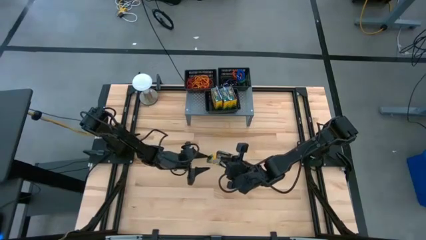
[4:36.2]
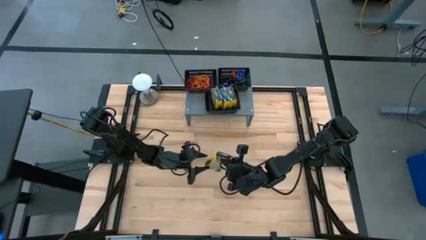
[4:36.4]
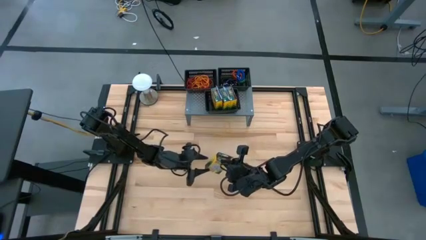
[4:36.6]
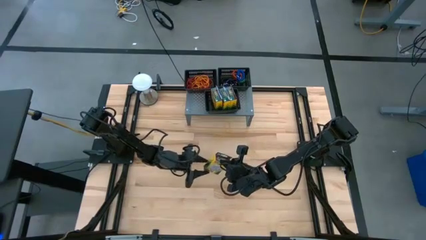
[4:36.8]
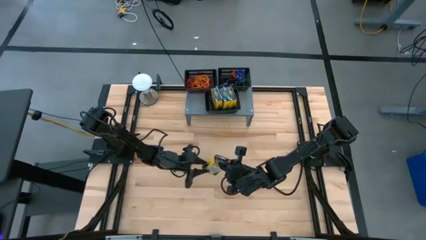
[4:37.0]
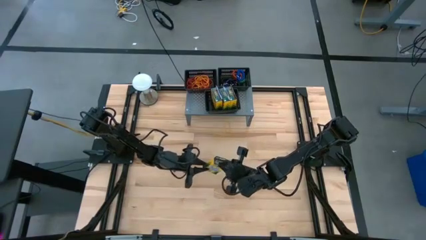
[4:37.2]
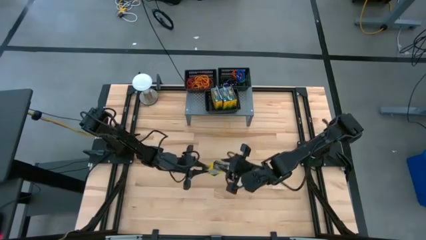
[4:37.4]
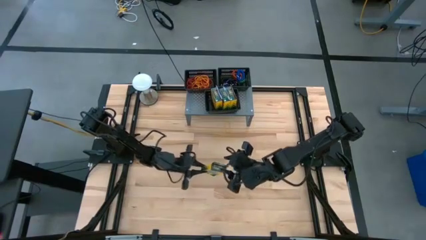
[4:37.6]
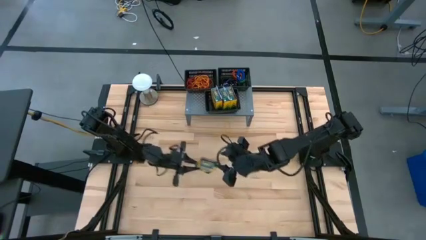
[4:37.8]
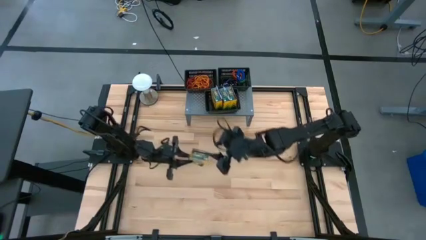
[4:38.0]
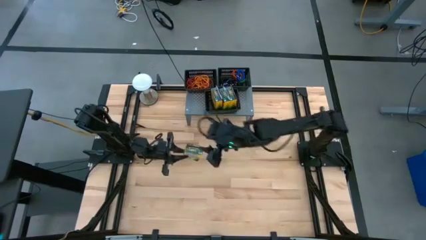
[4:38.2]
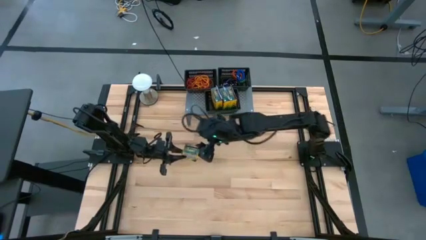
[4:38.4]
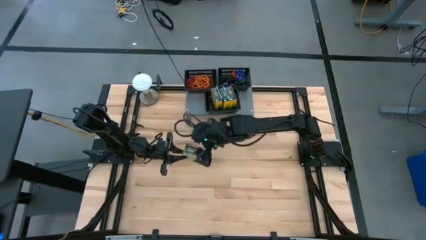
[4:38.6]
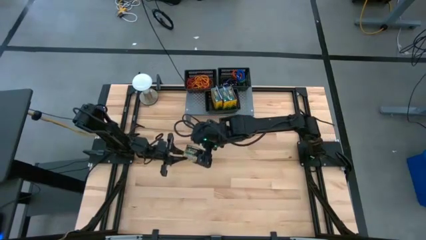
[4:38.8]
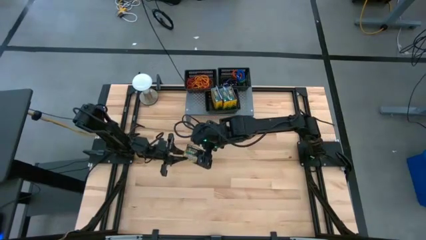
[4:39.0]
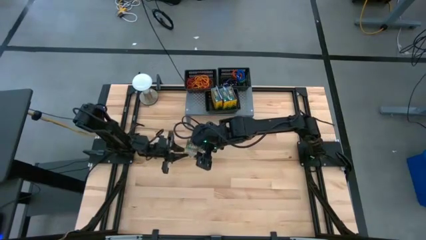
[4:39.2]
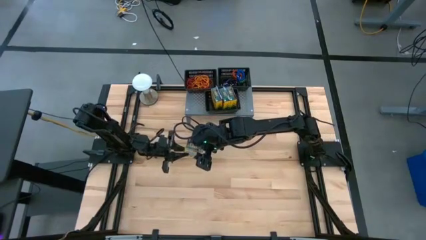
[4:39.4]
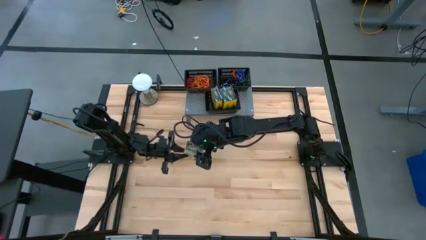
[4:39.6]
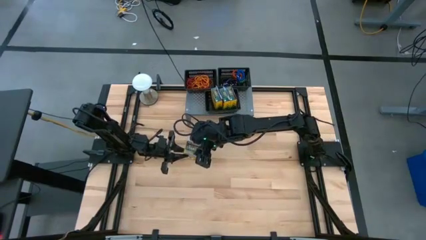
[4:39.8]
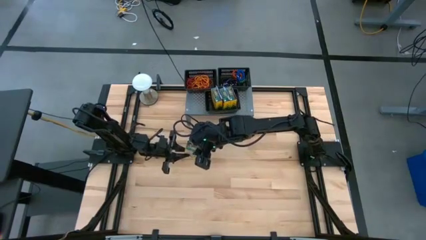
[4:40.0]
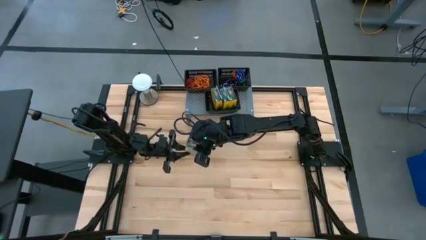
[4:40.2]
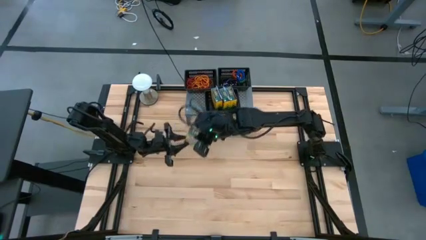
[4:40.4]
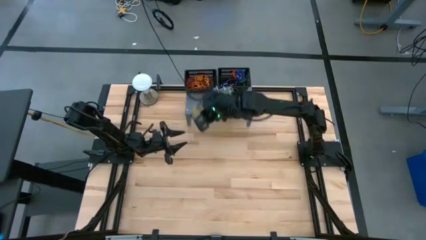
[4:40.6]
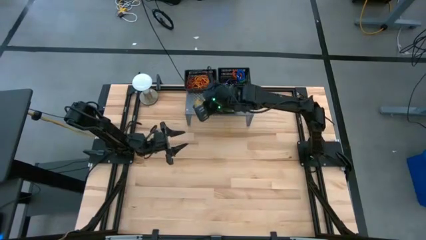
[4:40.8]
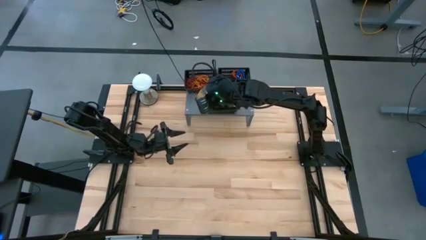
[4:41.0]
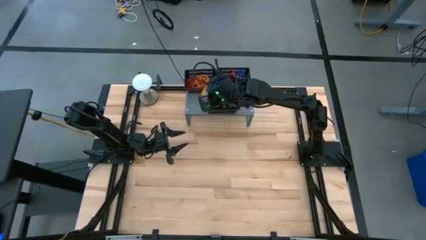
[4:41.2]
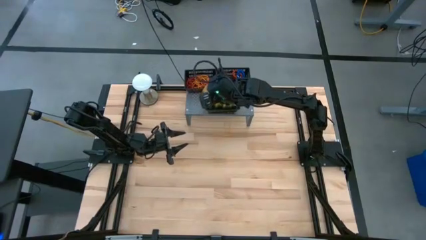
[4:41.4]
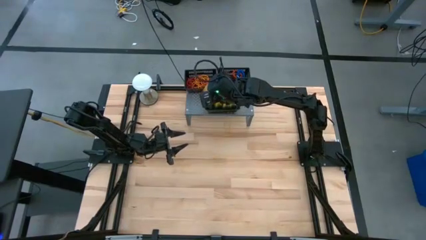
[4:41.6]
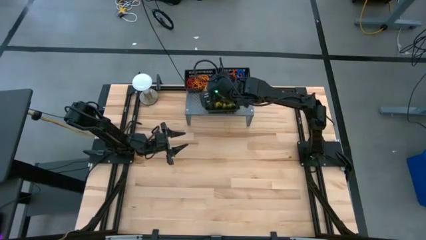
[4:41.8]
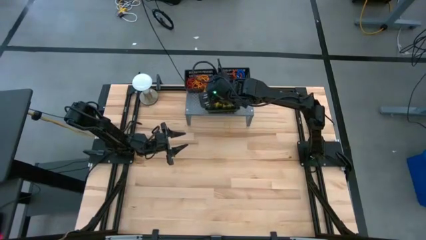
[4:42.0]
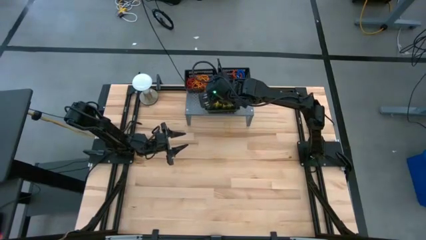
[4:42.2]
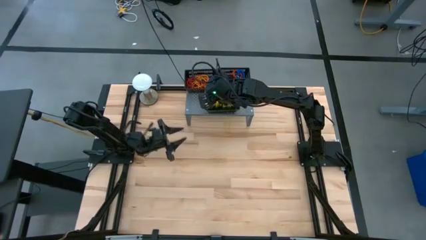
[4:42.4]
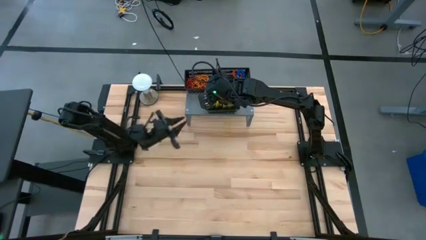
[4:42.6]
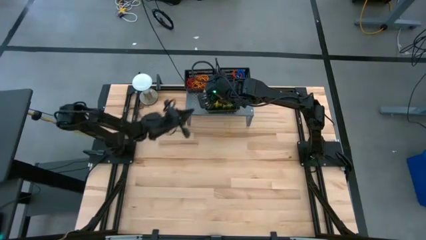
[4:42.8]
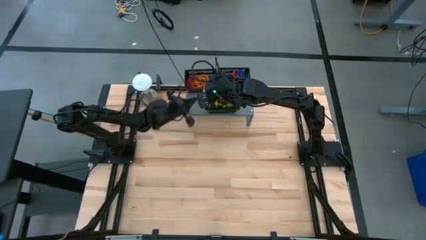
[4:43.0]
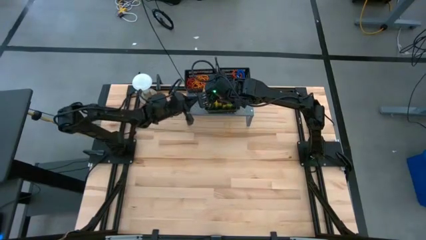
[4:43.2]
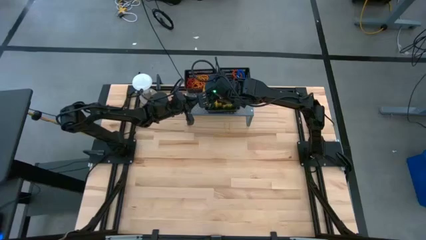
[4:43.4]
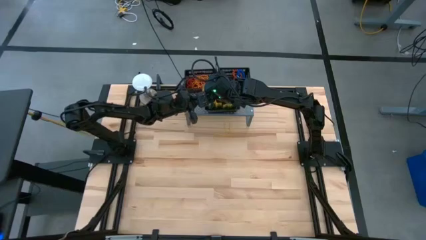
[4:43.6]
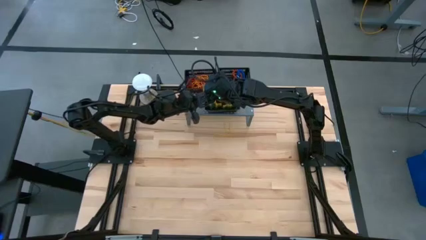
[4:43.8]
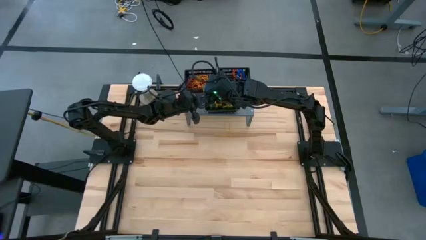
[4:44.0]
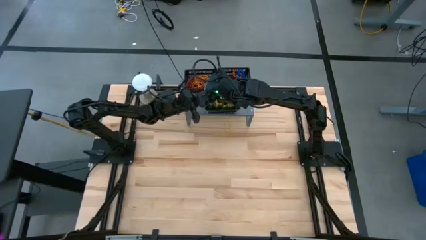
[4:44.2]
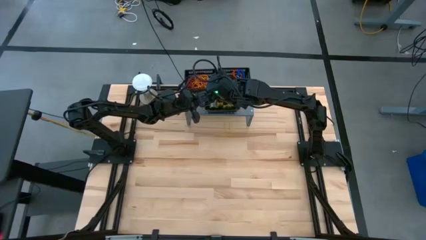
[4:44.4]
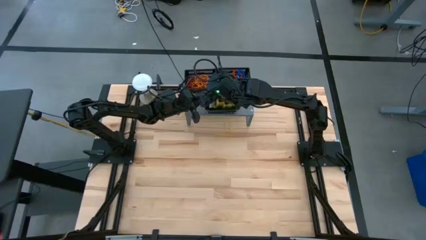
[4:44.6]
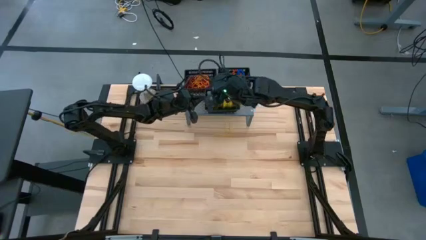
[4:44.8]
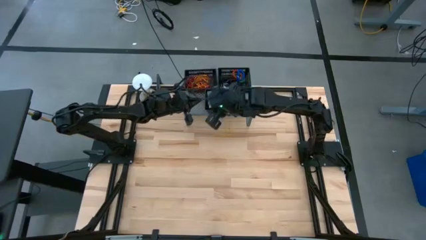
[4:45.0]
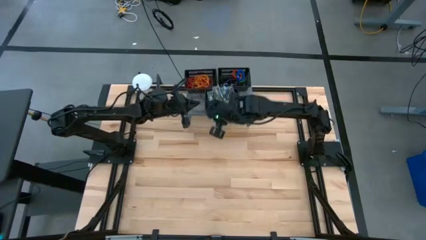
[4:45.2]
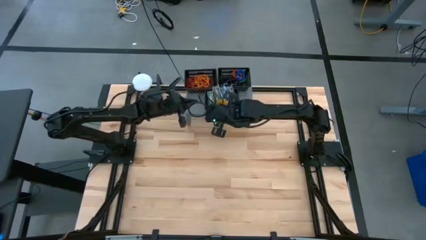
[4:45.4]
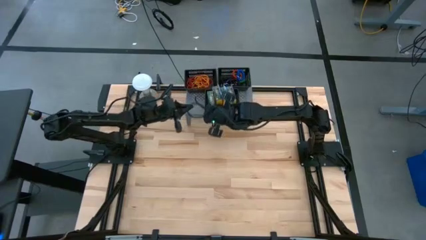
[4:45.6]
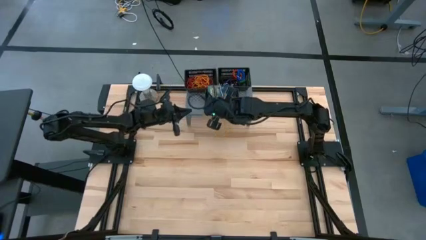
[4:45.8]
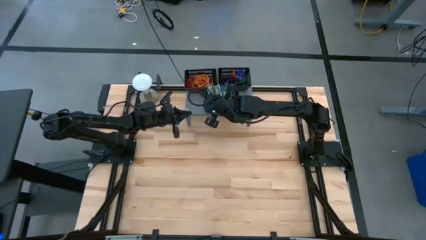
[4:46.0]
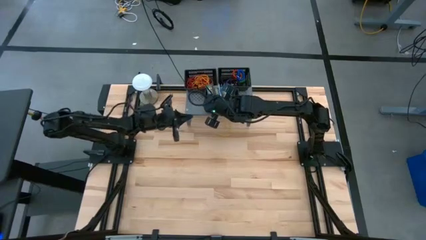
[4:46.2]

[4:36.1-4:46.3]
Task: Pick & Place Office Desk Supplies
Put the crayon box into the bottom black basket on the shelf

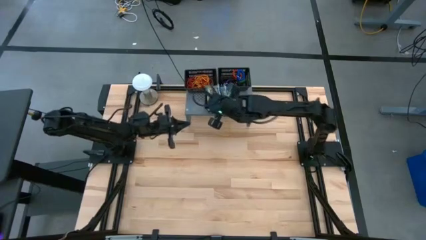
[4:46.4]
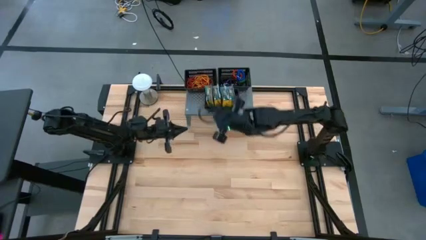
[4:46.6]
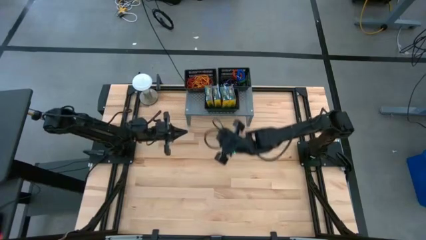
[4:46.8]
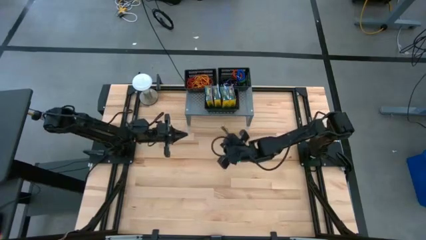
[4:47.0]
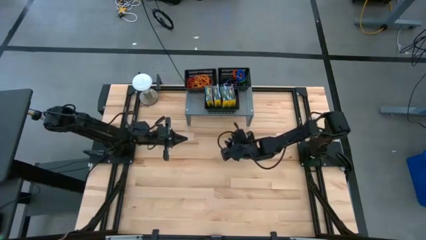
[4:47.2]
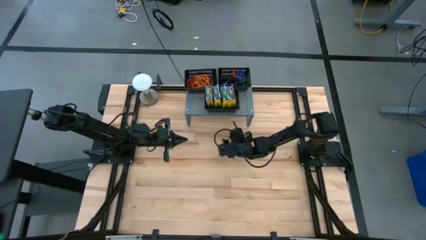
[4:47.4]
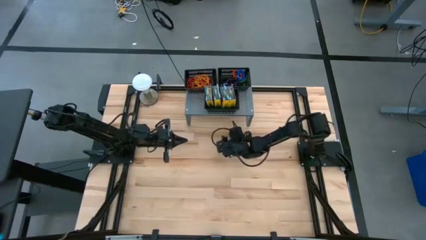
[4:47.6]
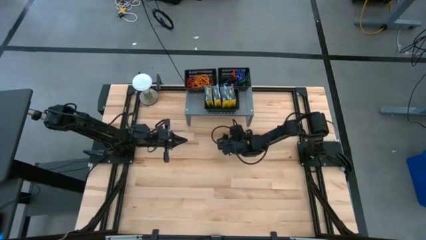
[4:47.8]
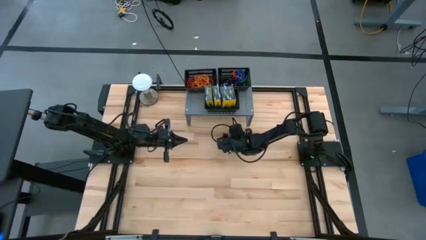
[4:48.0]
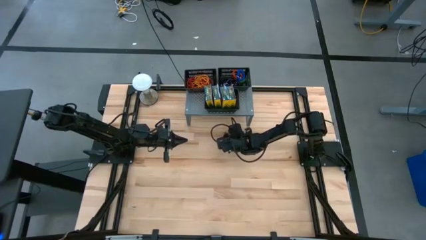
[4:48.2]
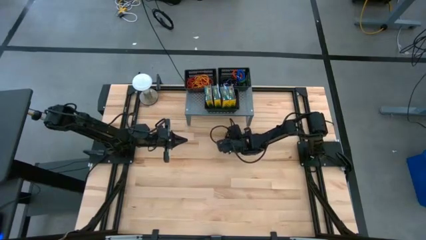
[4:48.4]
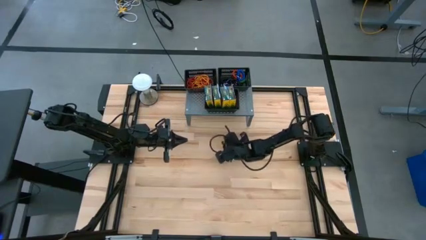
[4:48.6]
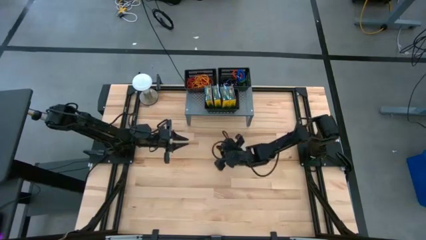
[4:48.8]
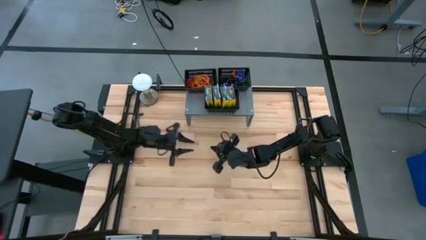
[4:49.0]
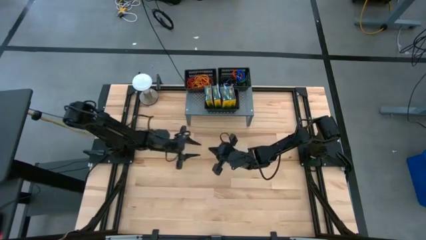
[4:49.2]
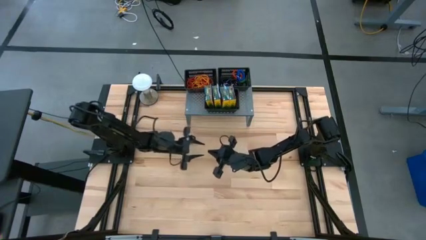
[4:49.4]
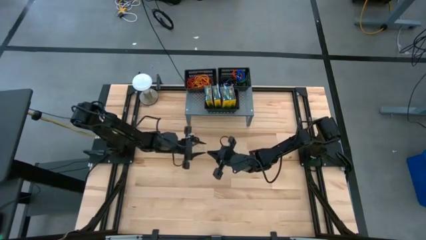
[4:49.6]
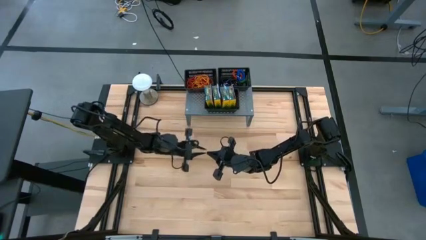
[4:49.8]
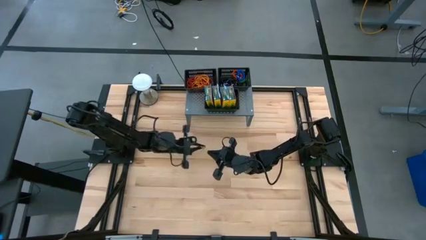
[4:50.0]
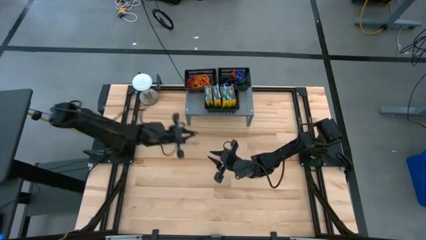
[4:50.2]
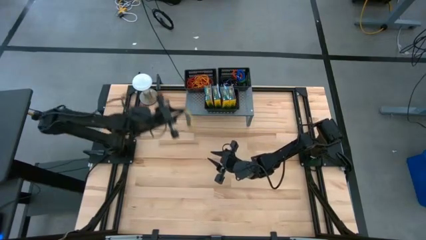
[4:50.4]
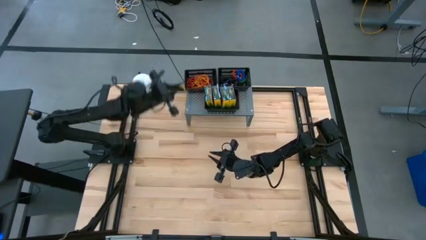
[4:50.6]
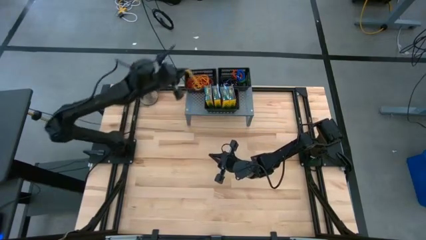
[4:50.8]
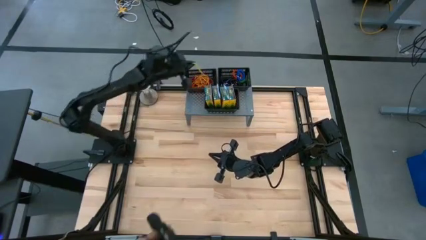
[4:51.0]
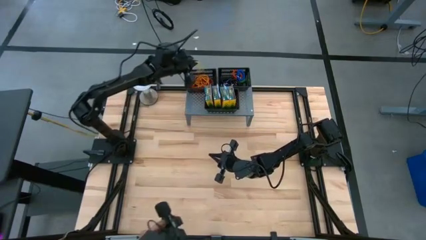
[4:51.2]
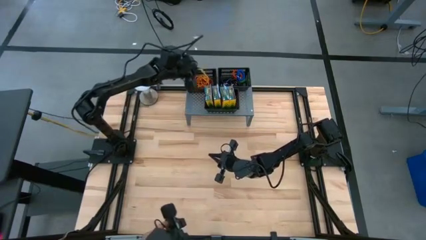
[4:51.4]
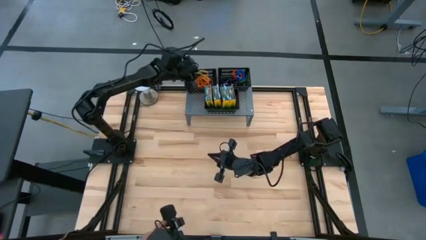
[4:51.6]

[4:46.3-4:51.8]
Put the yellow rubber band into the top left black basket on the shelf

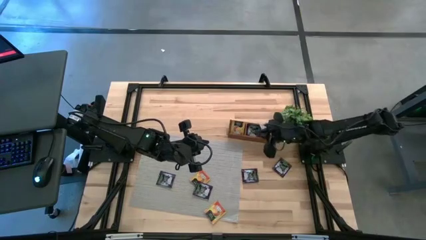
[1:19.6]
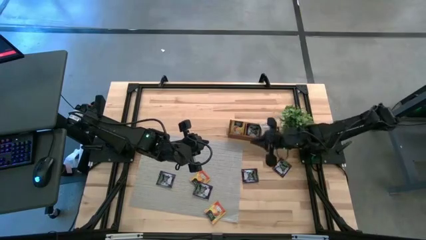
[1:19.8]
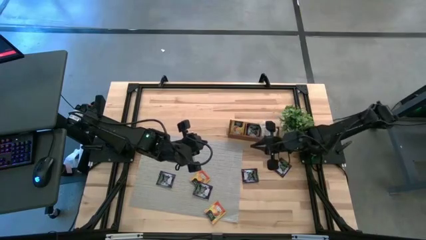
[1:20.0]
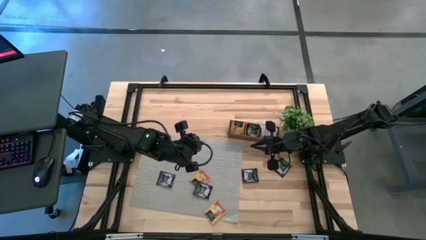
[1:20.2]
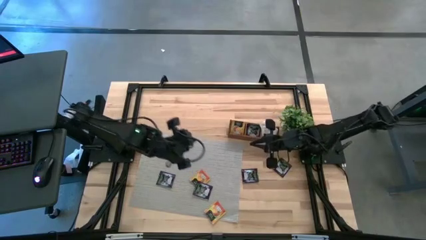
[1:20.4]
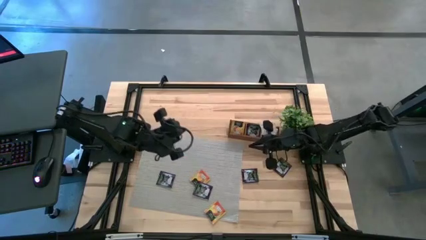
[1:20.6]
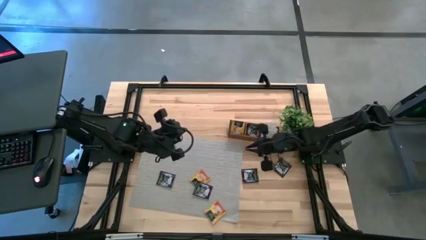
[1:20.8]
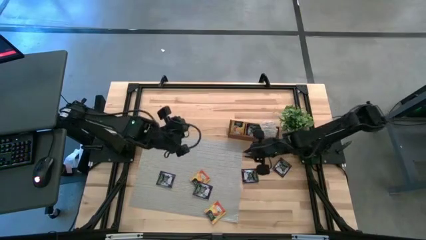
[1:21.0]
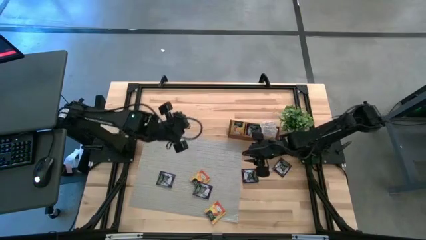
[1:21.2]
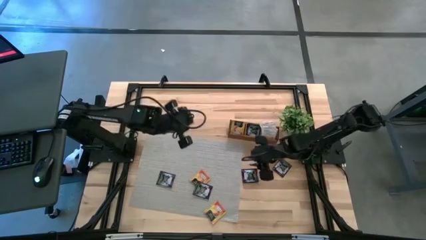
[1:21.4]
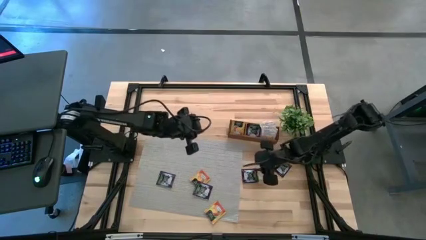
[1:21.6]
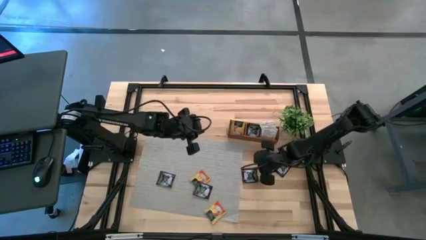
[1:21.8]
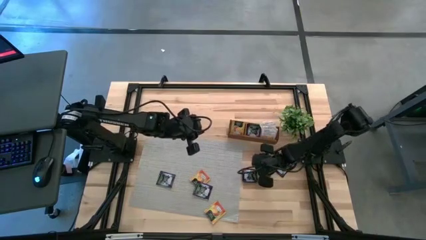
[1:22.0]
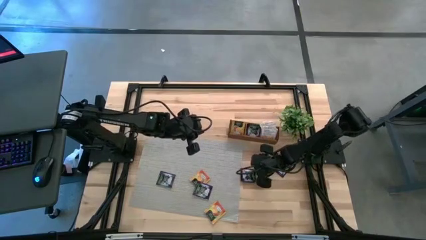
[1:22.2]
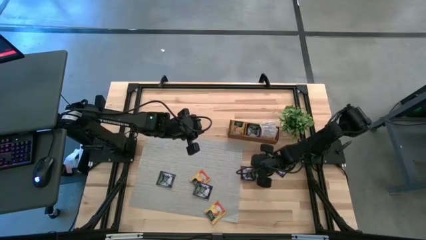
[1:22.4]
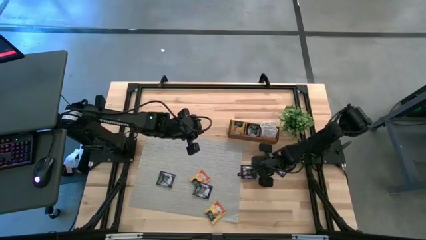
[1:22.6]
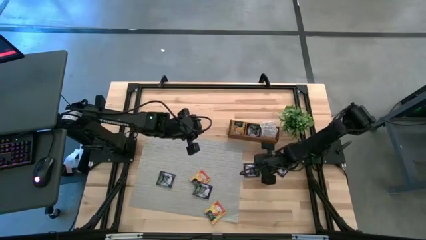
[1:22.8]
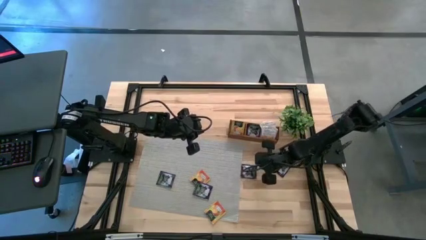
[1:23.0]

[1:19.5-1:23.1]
Task: Pick & Place Tea
Put the dark purple tea bag in the middle section of the wooden organizer
